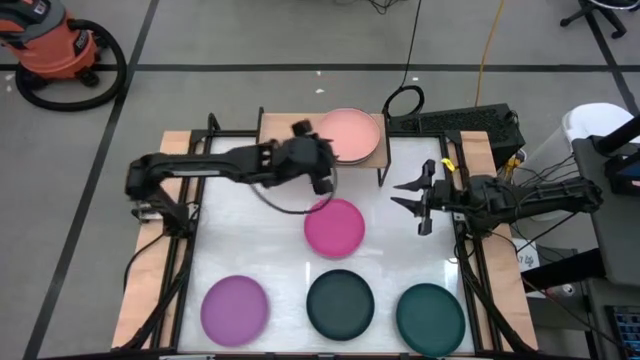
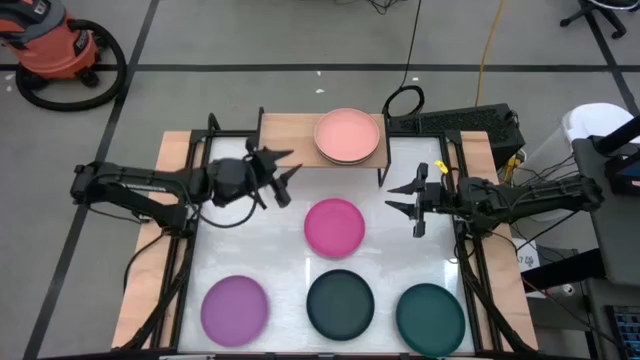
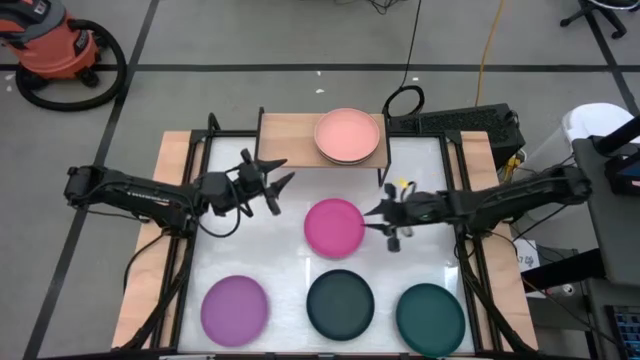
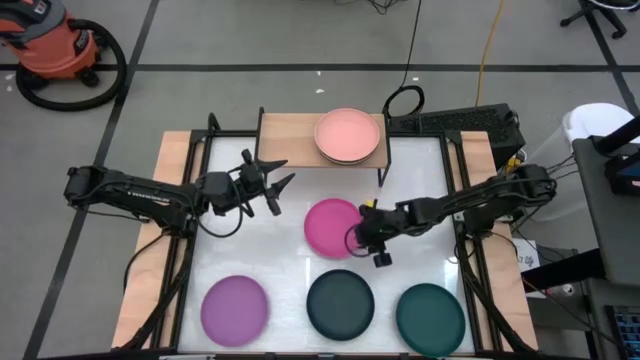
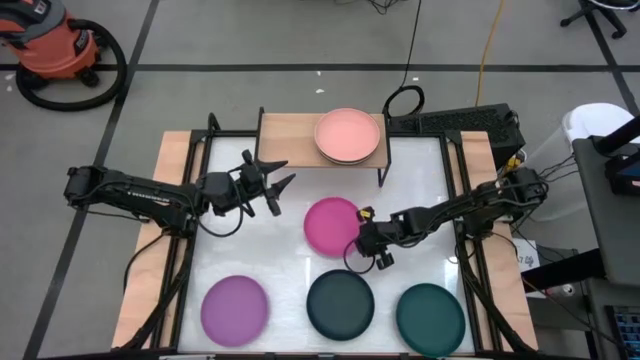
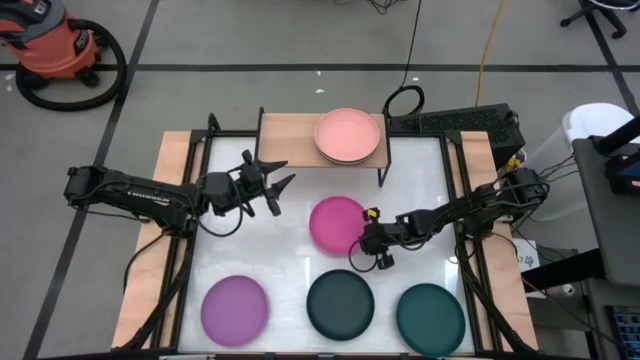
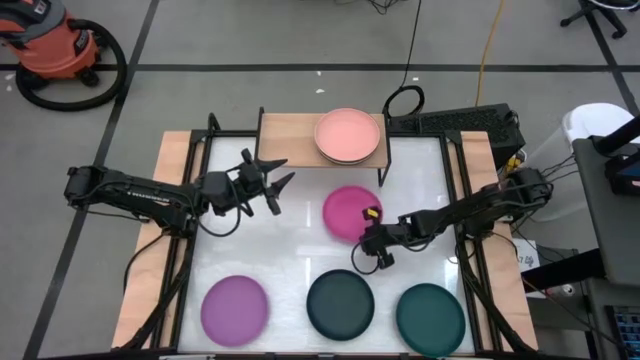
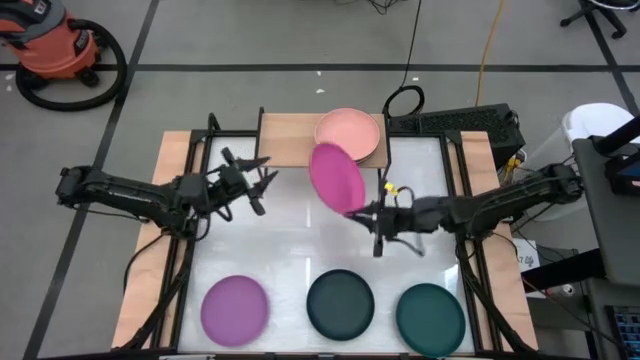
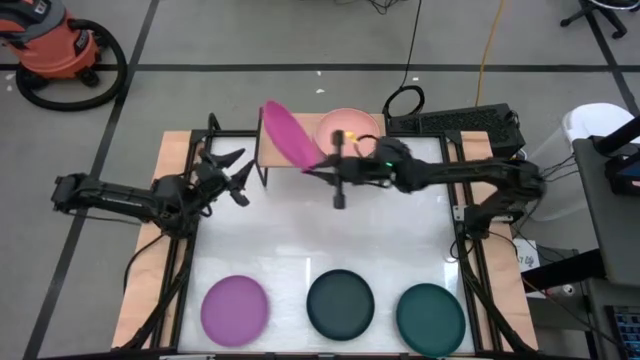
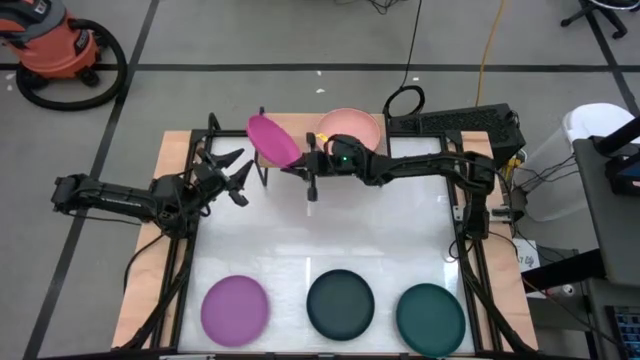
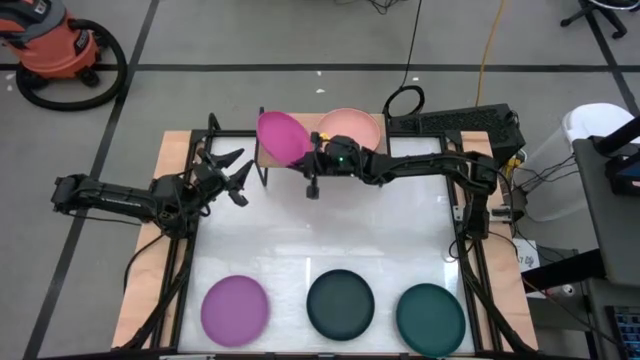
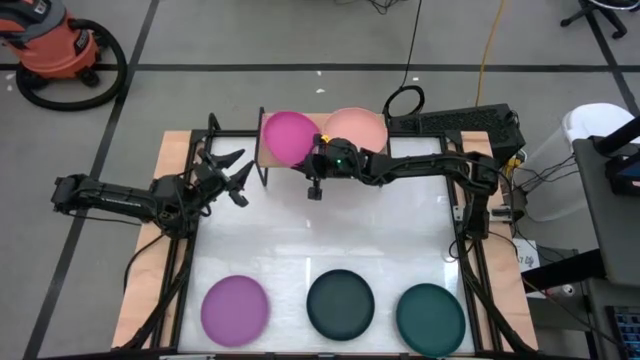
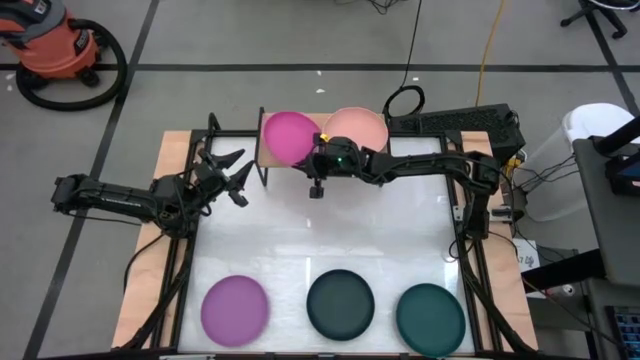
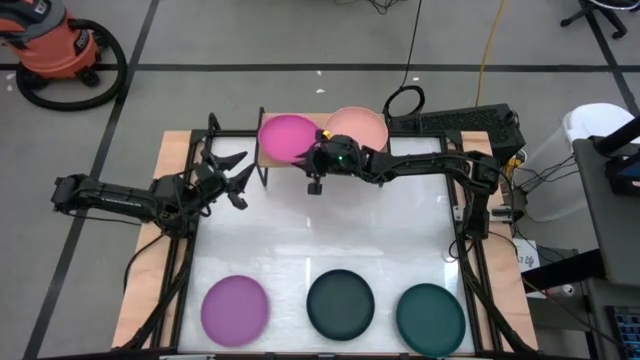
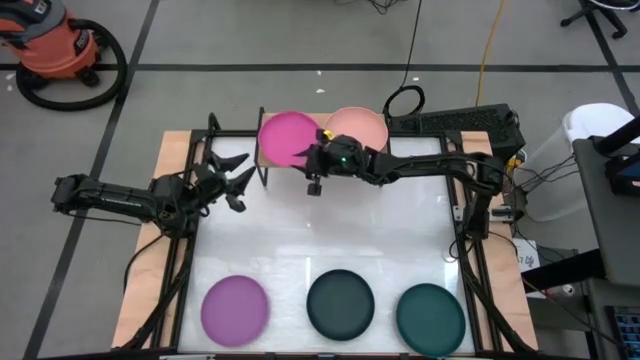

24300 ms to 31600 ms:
Task: Place and stack plates onto a shelf
Put the pink plate on the shelf

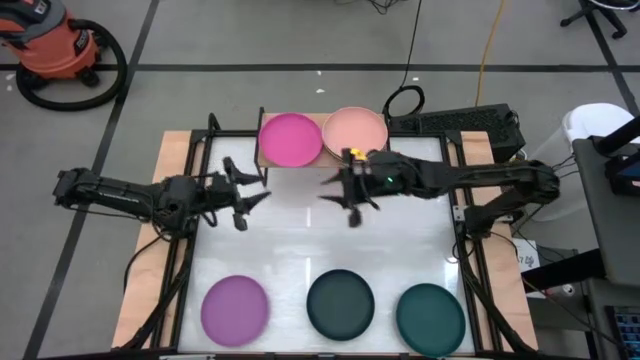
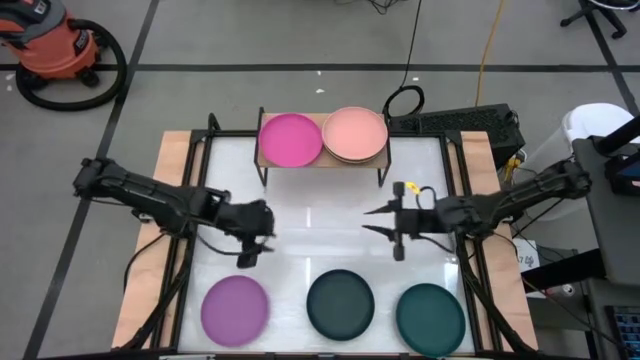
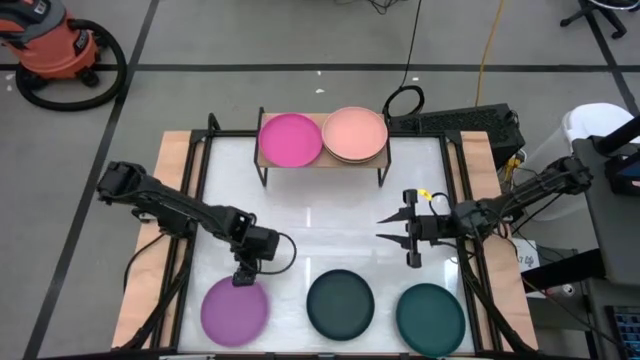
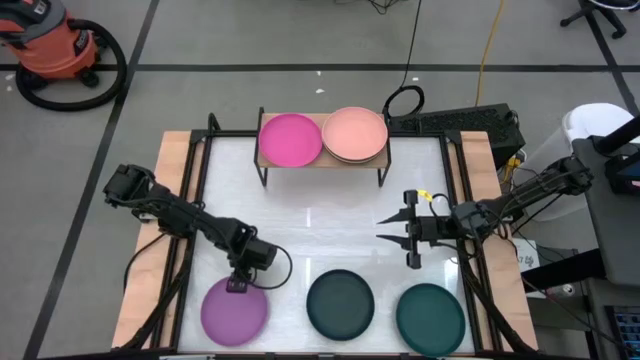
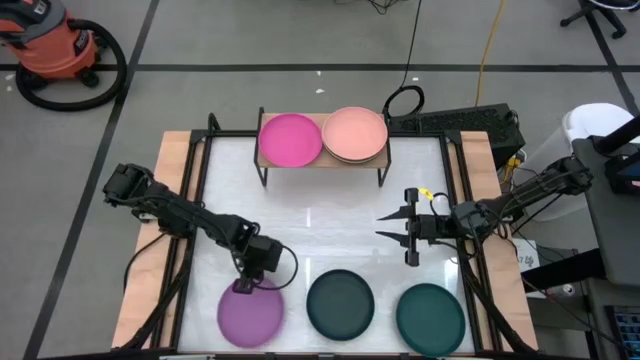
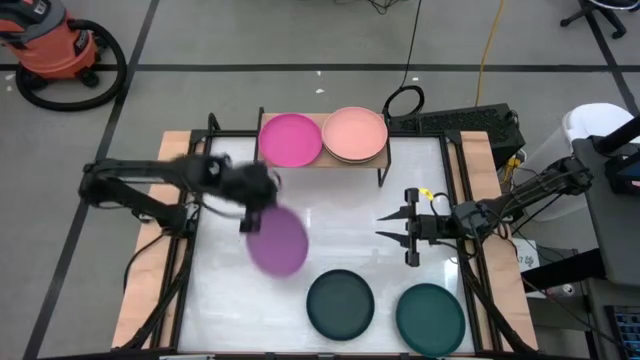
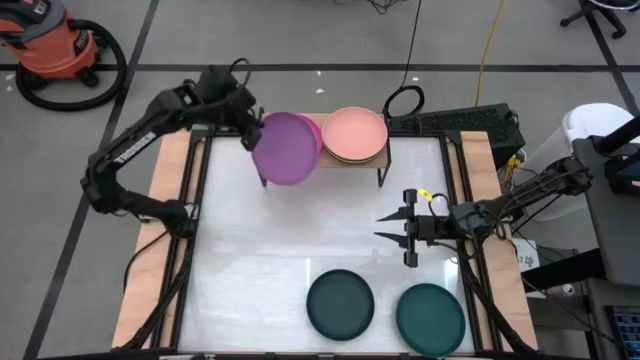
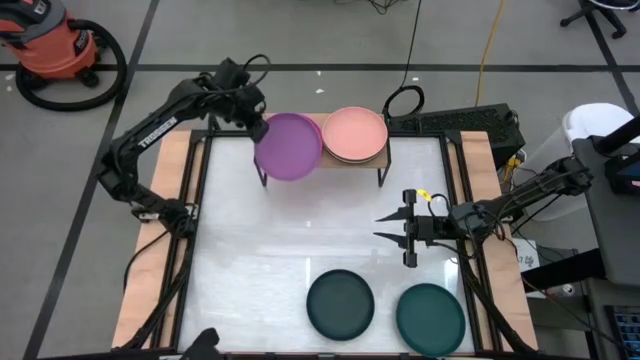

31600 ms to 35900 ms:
Stack the purple plate on top of the pink plate on the shelf

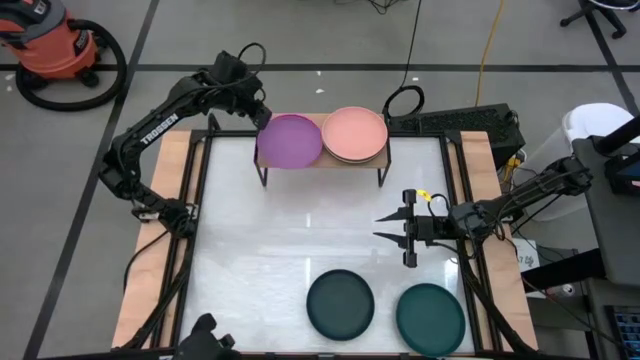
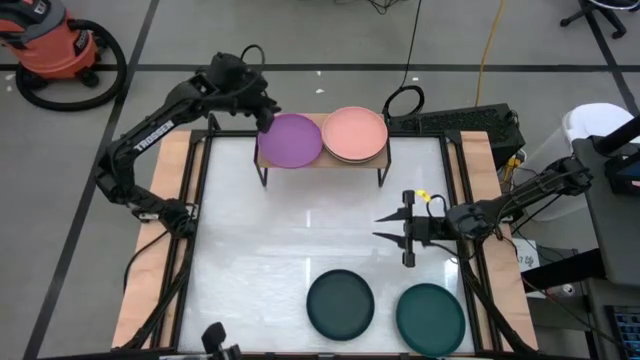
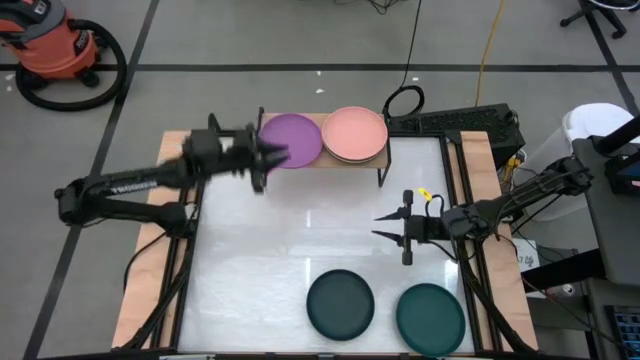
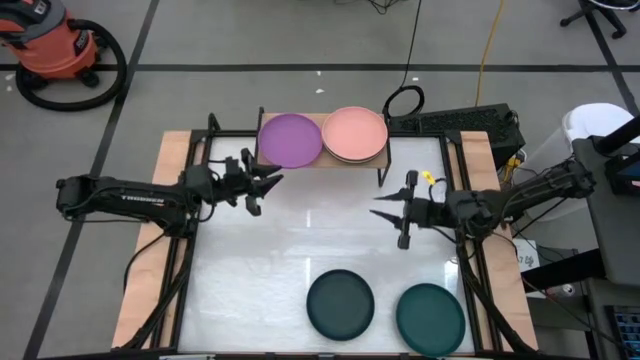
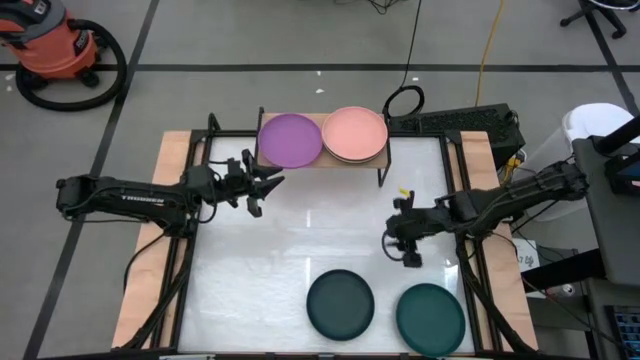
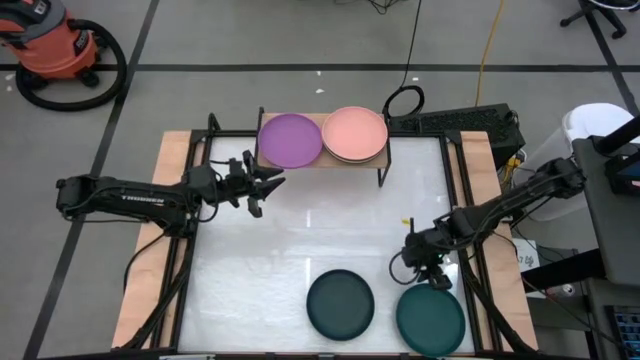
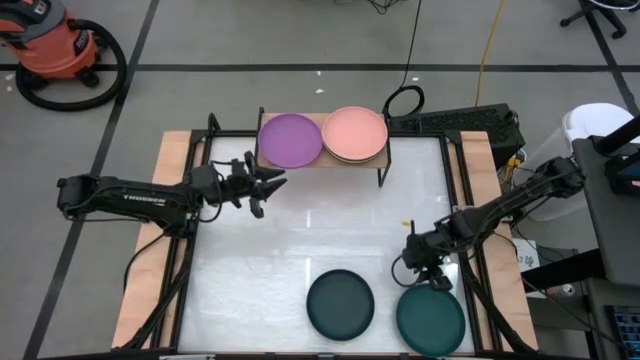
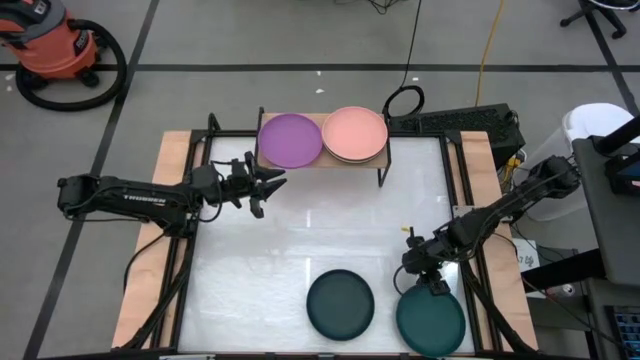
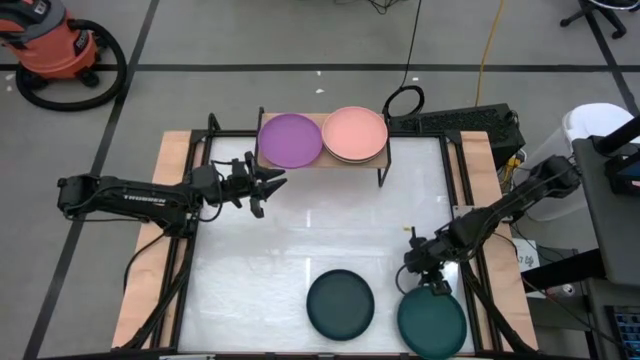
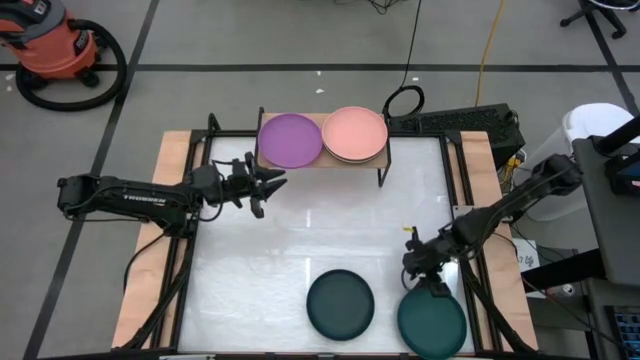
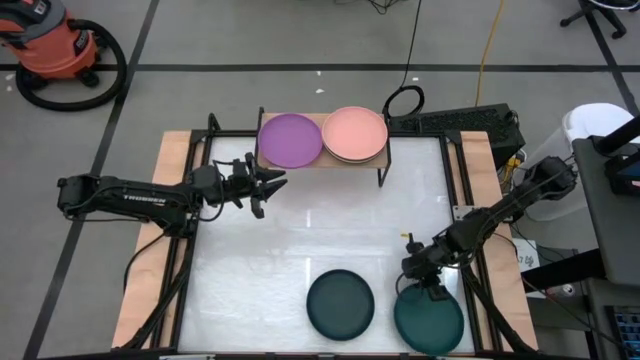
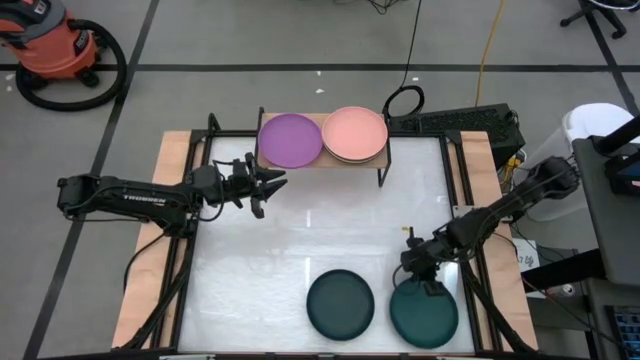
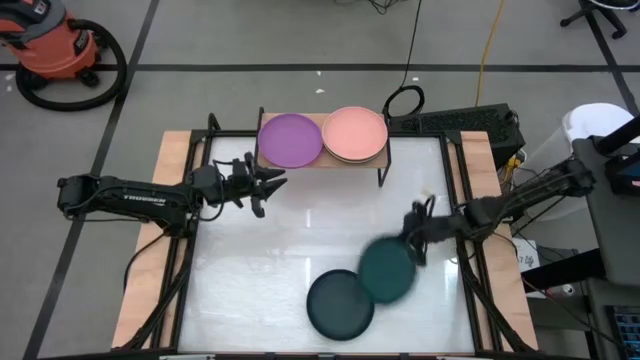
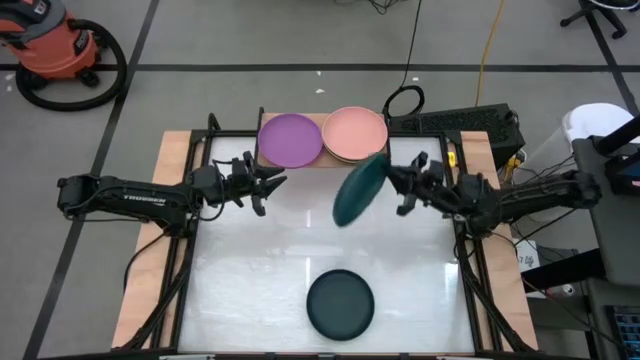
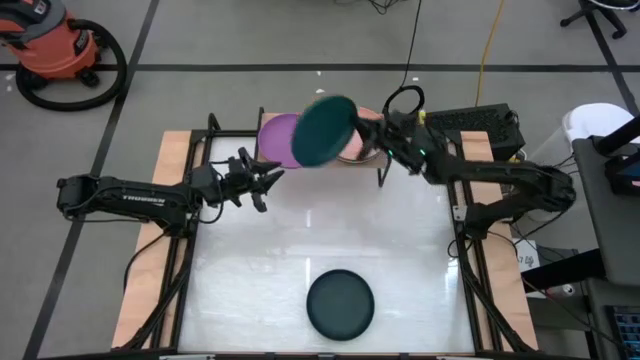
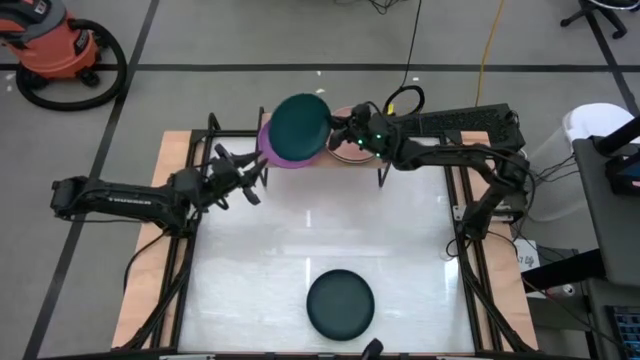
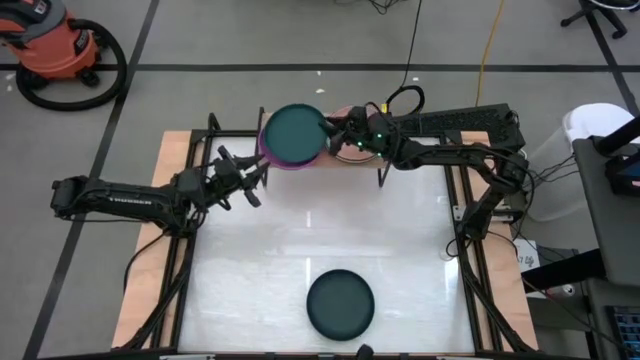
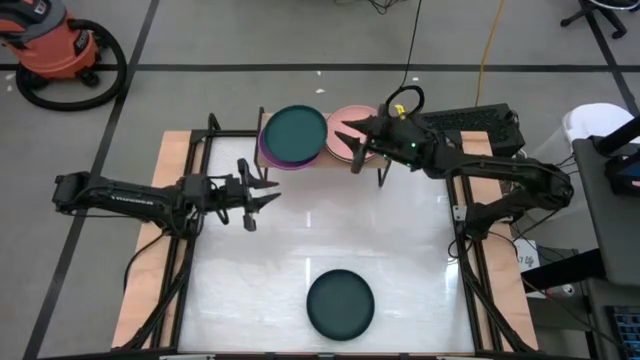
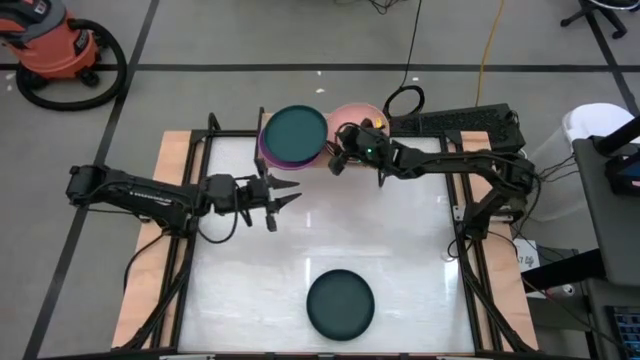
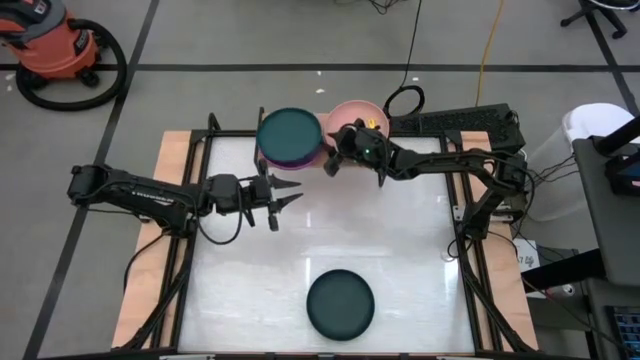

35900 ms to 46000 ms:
Stack the green plate on top of the purple plate on the shelf
